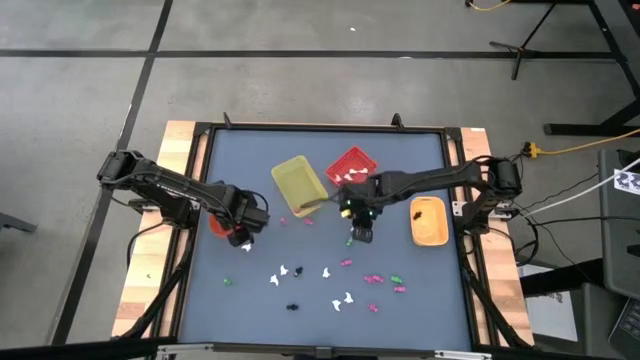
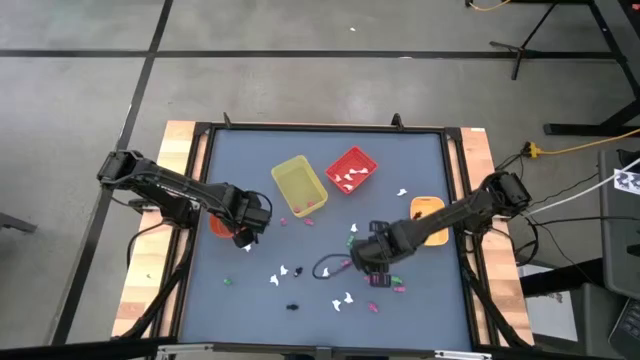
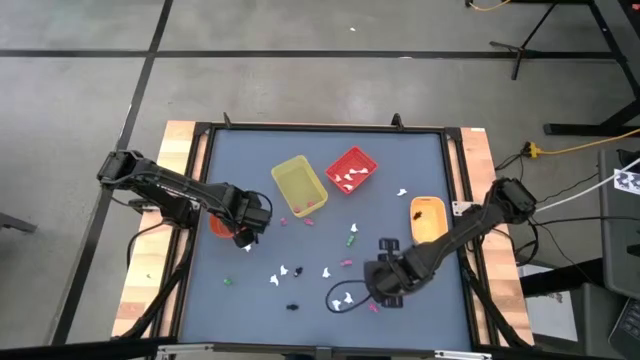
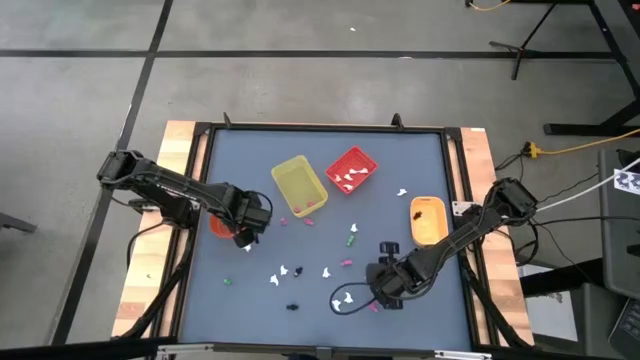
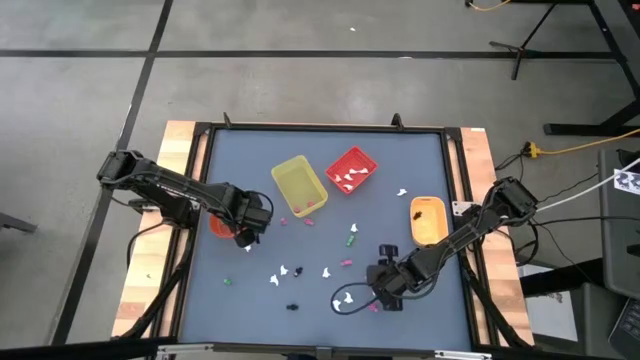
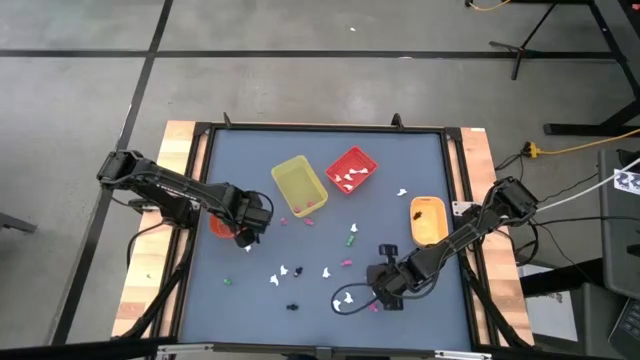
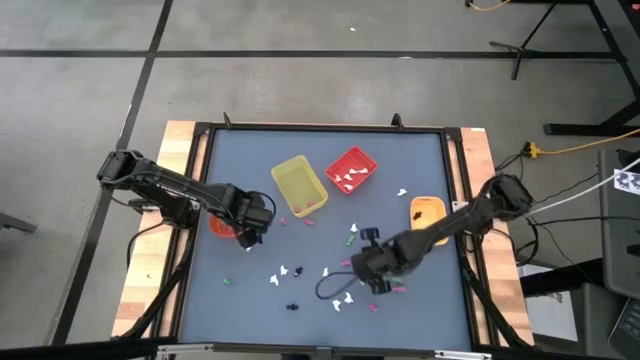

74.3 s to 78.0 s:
Task: Sort Halloween decoration
Put the pink skeleton toy into the yellow bin

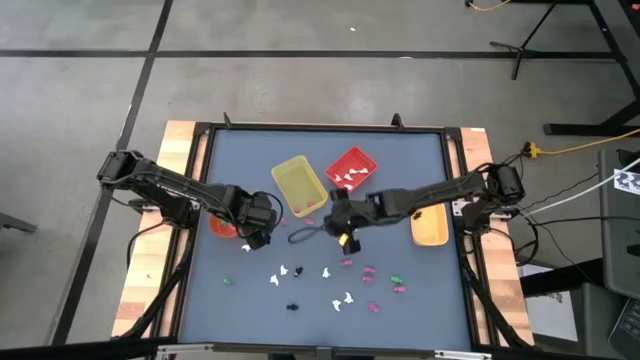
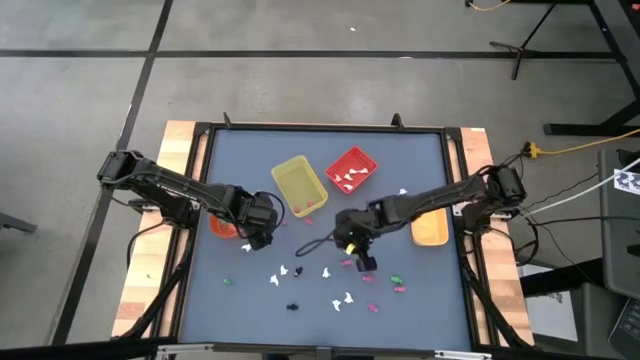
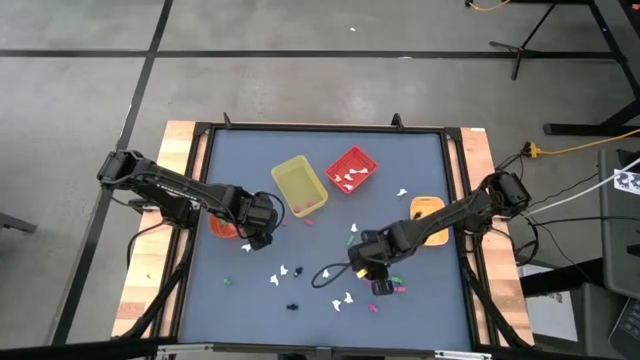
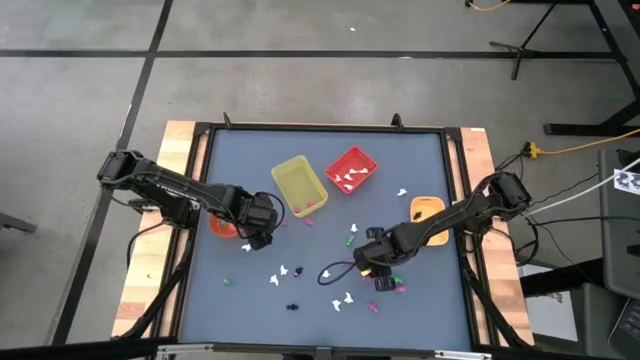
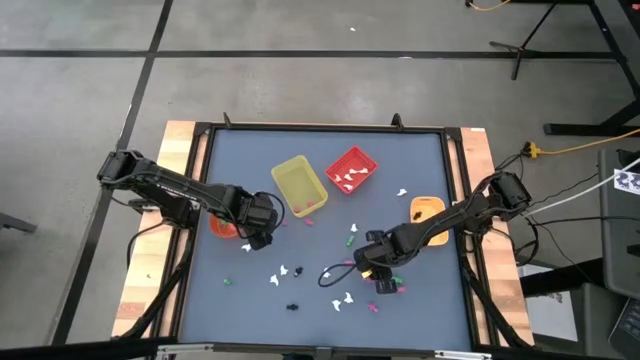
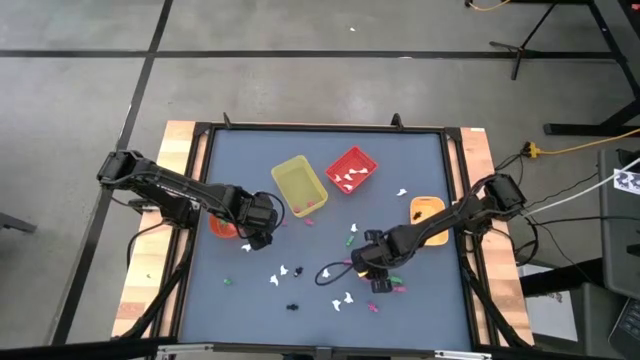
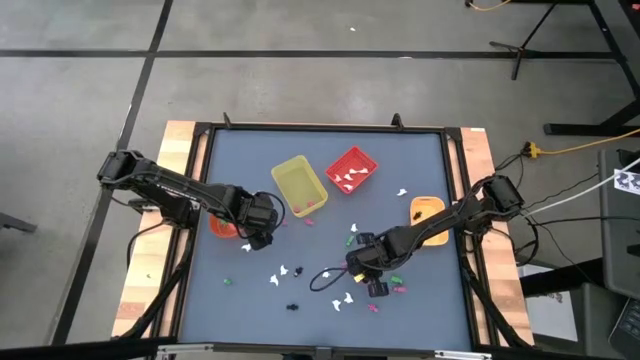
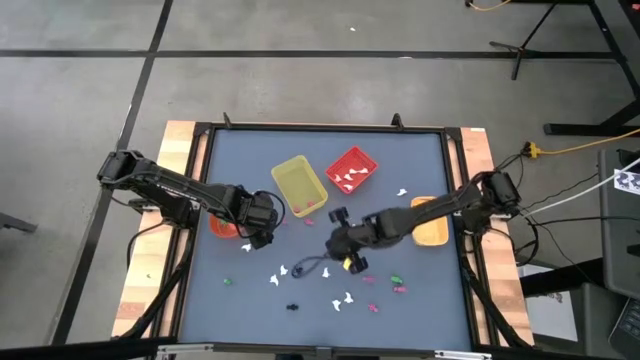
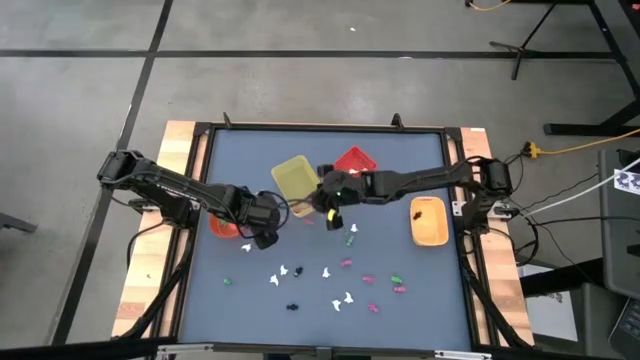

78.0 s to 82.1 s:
Put the pink skeleton toy into the yellow bin

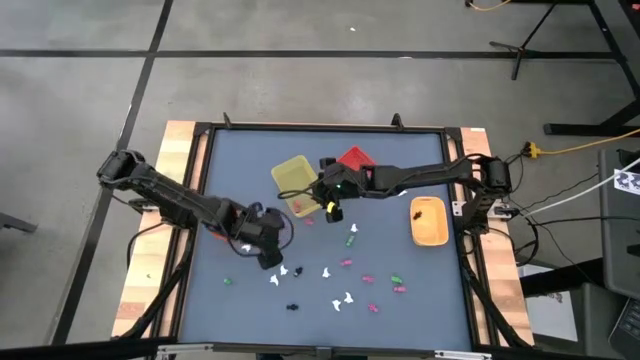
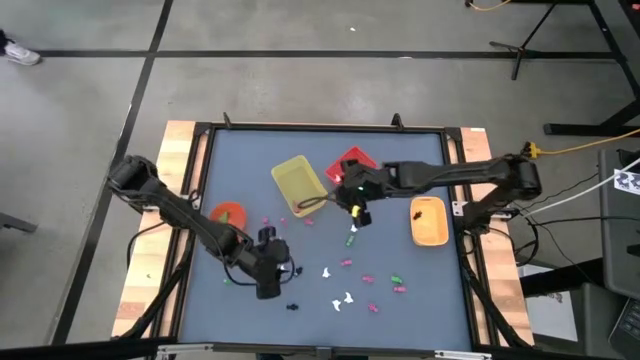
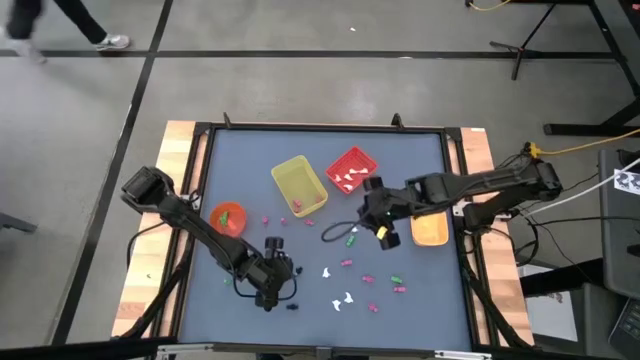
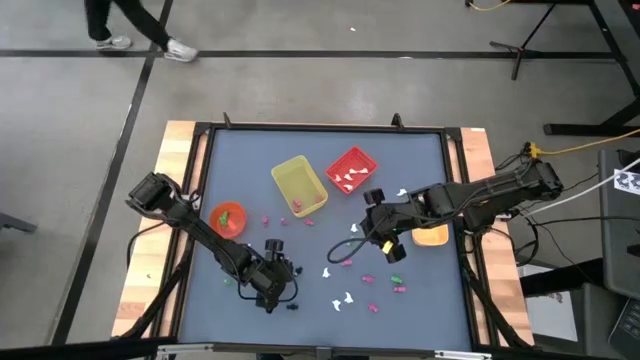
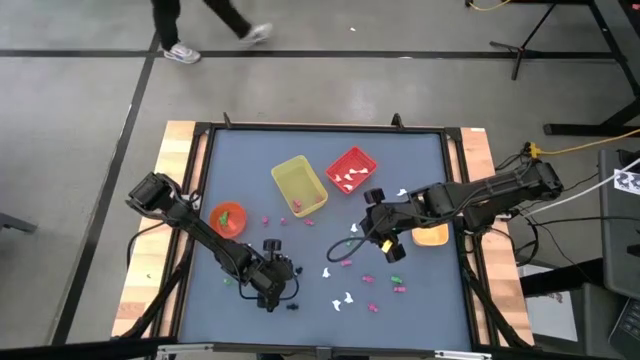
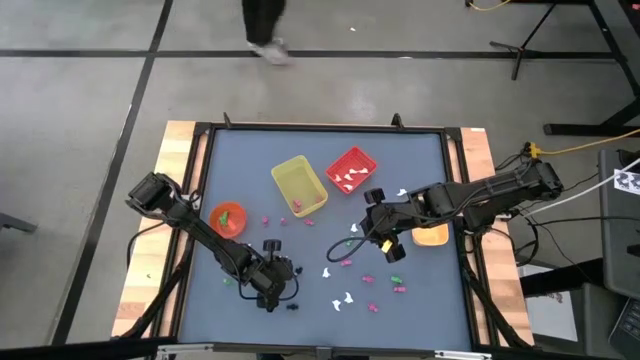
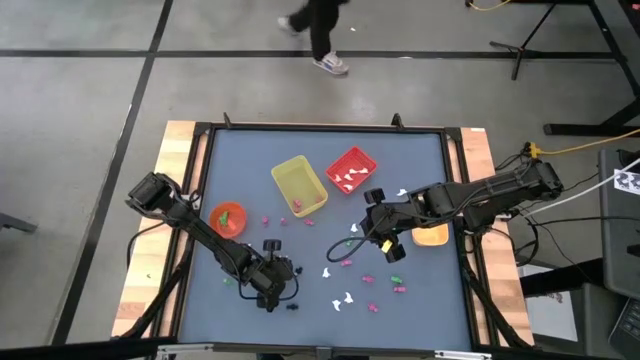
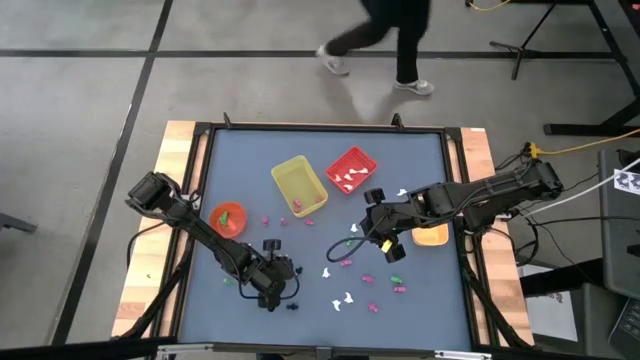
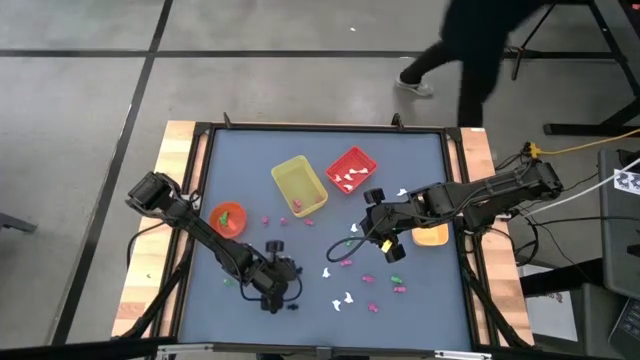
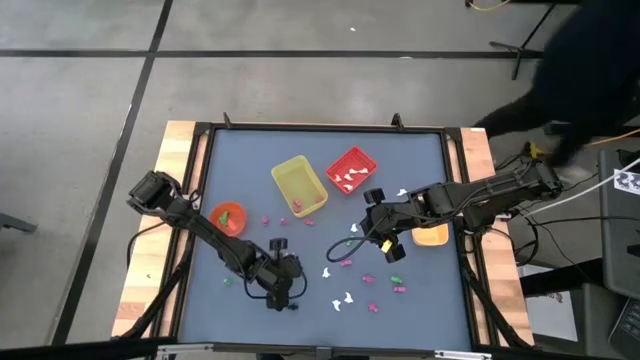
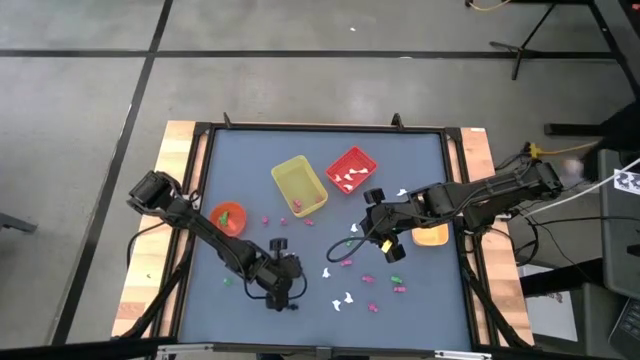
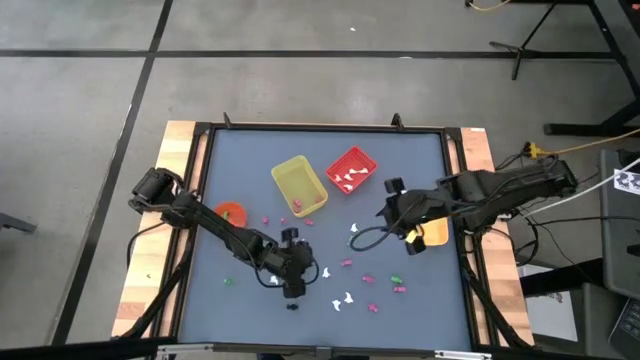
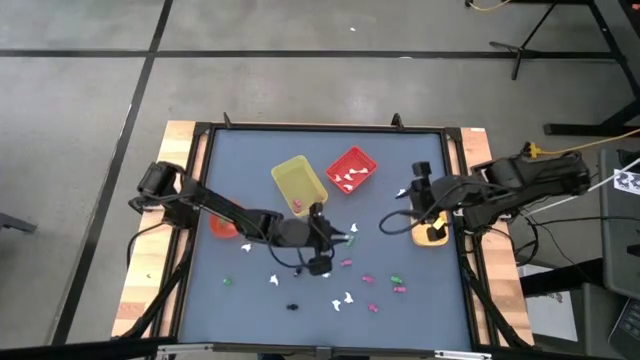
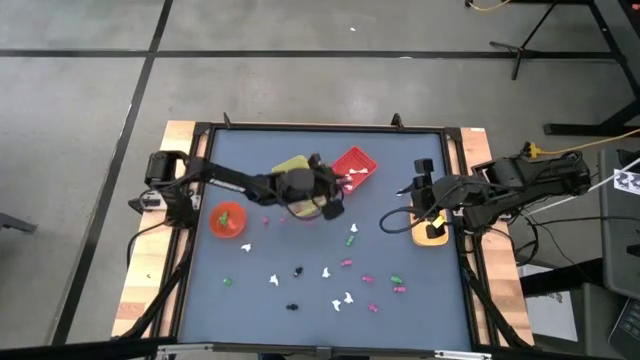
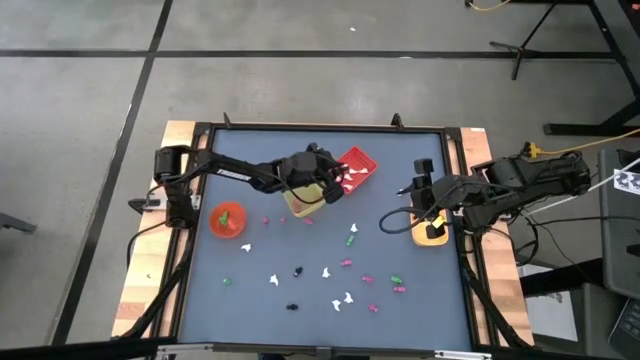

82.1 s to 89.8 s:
Put the white ghost toy into the red bin

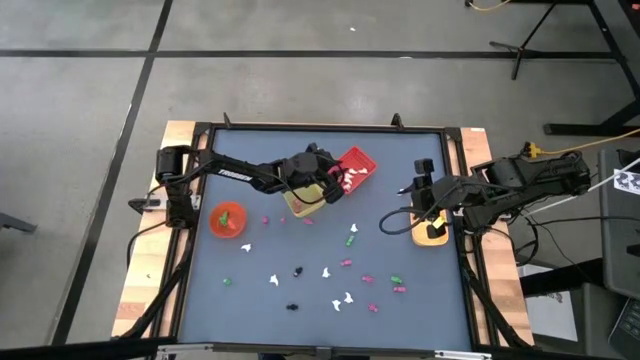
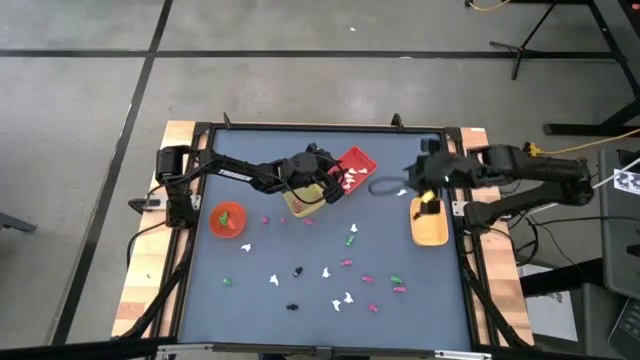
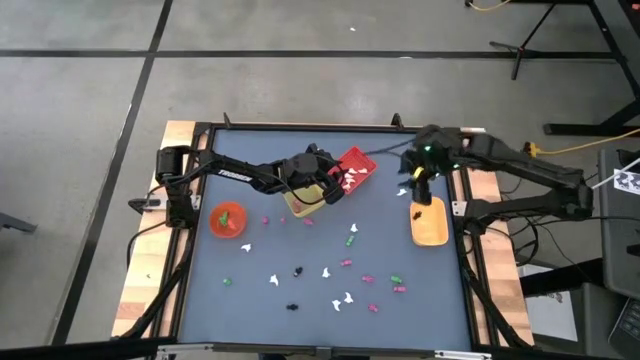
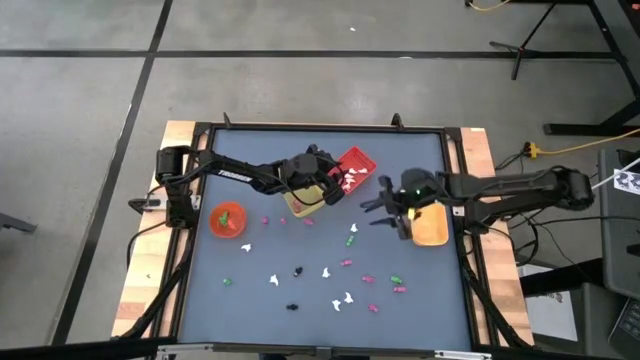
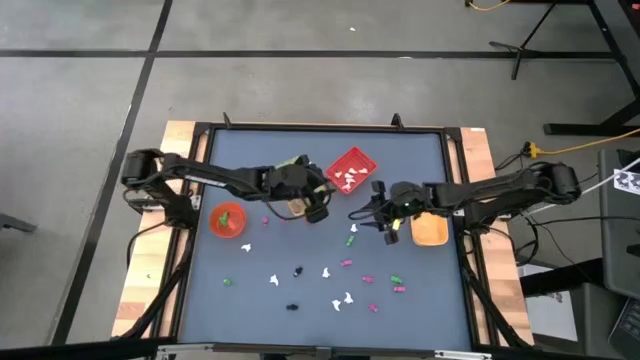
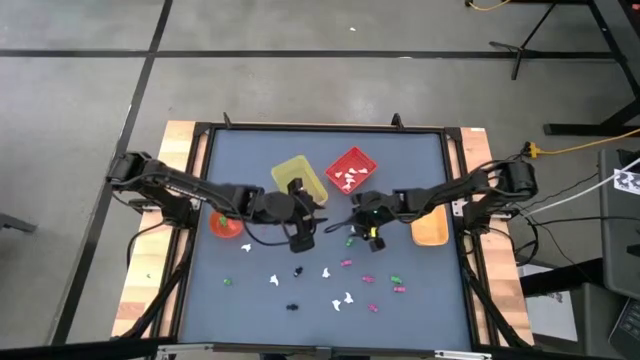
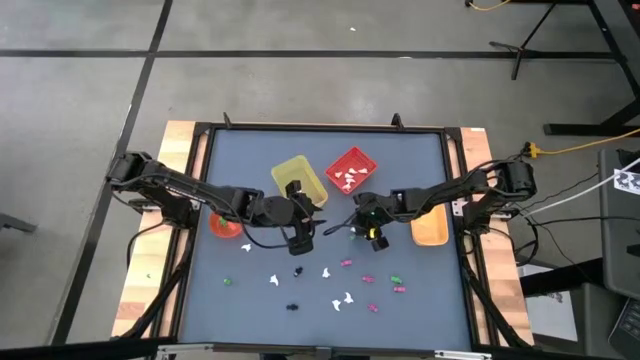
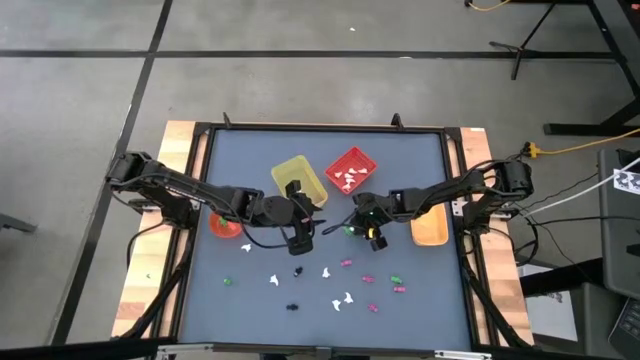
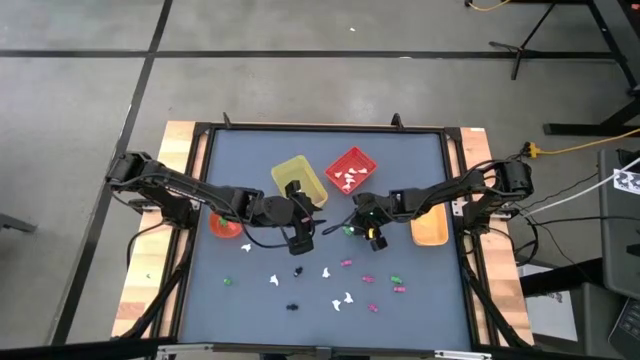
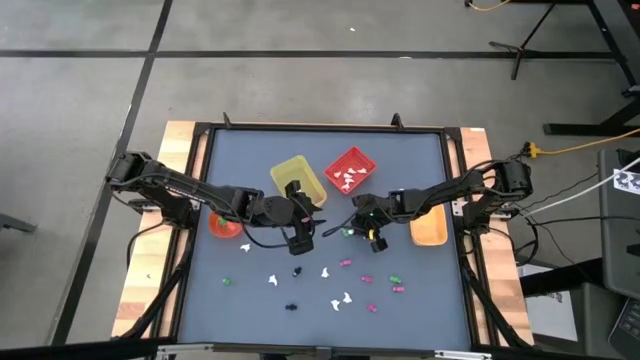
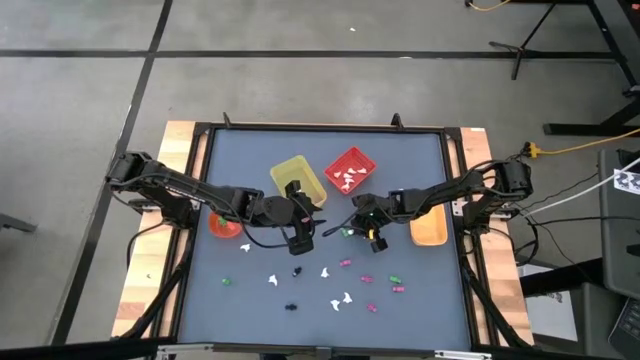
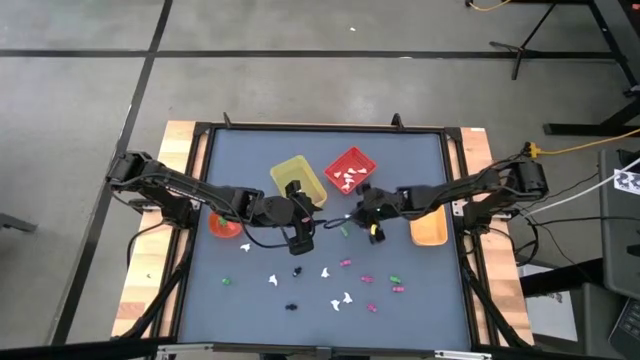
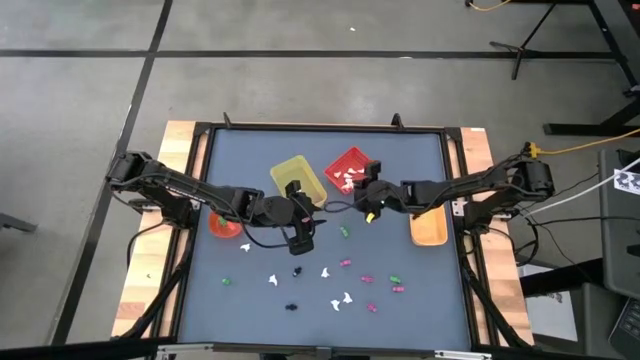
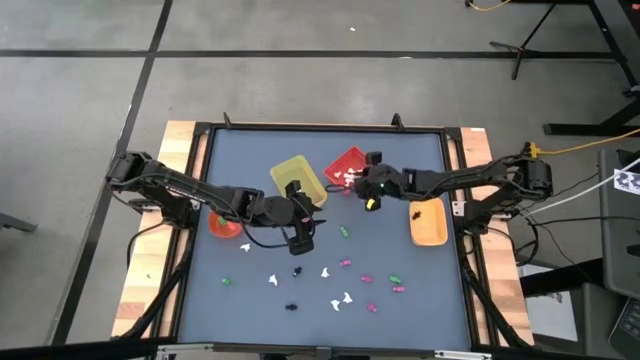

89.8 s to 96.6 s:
Put the white ghost toy into the red bin
